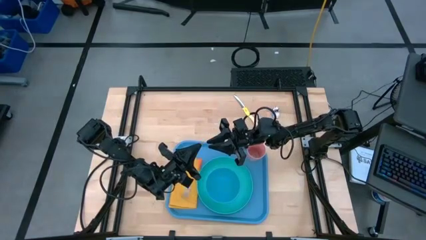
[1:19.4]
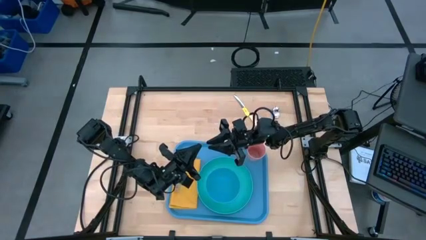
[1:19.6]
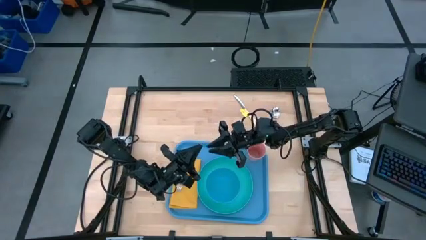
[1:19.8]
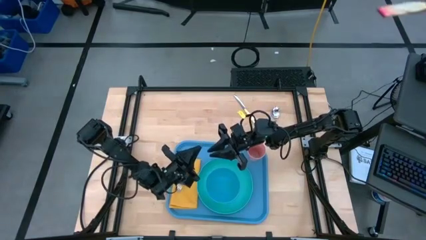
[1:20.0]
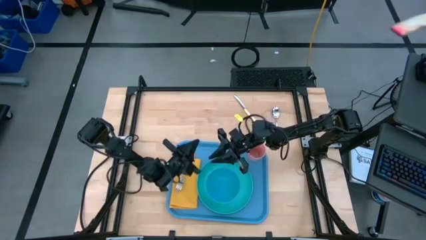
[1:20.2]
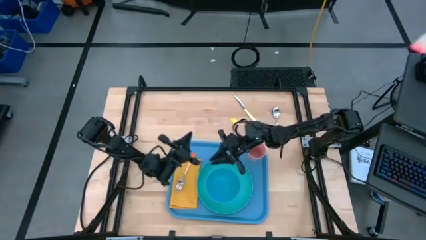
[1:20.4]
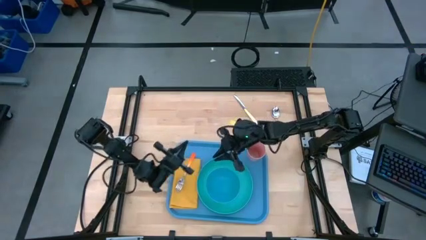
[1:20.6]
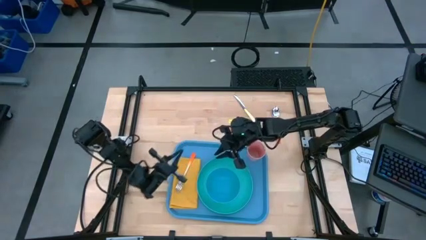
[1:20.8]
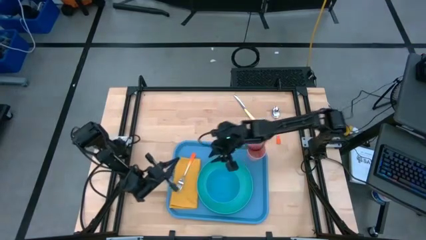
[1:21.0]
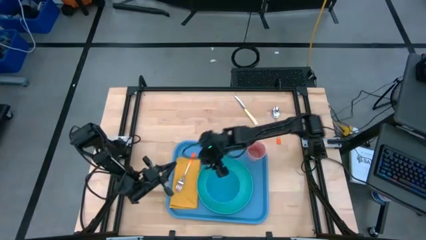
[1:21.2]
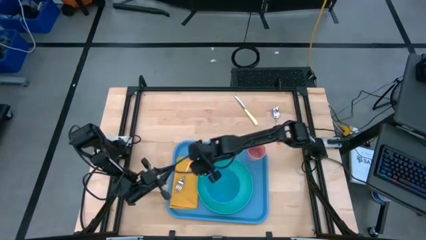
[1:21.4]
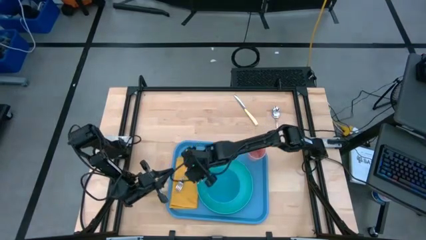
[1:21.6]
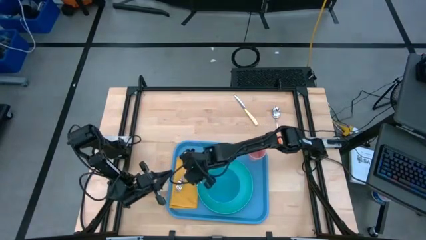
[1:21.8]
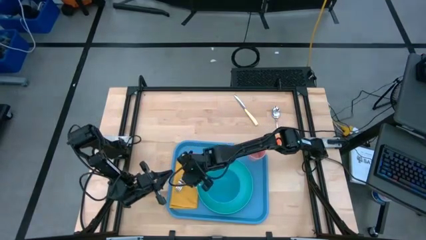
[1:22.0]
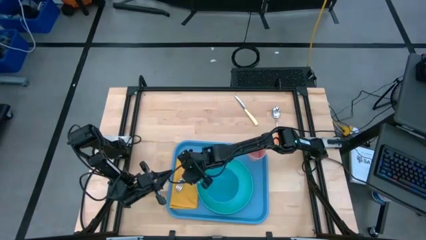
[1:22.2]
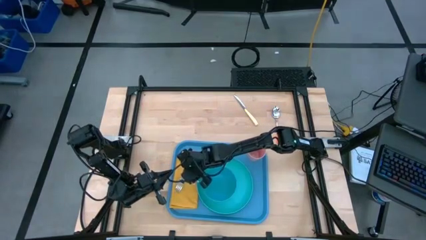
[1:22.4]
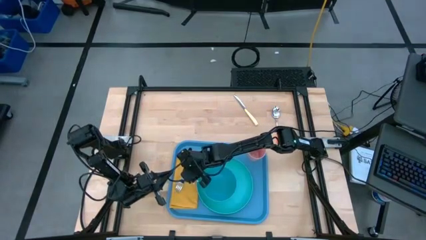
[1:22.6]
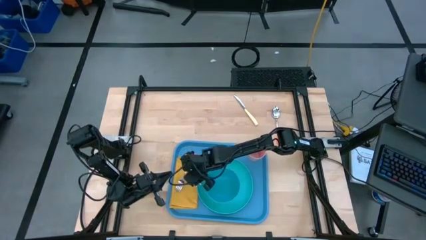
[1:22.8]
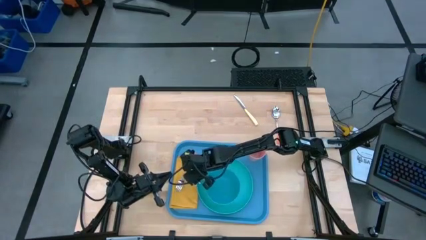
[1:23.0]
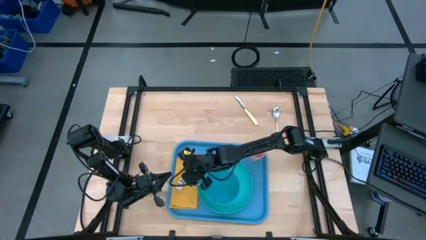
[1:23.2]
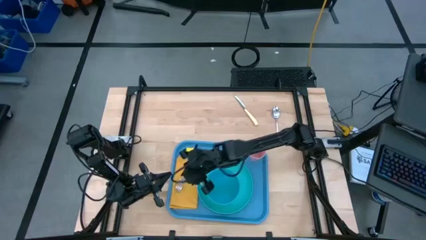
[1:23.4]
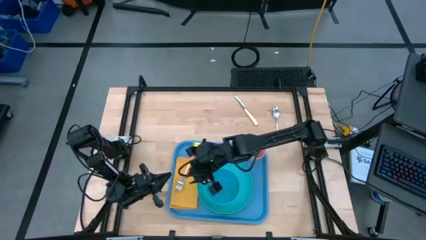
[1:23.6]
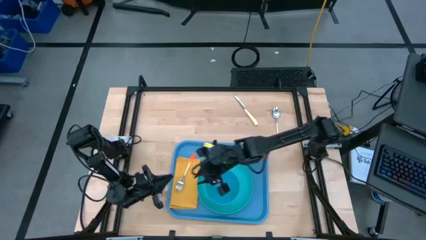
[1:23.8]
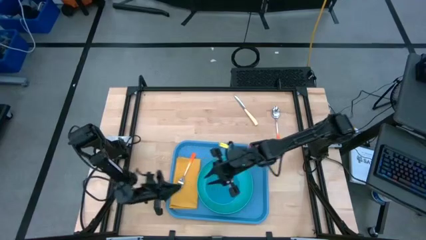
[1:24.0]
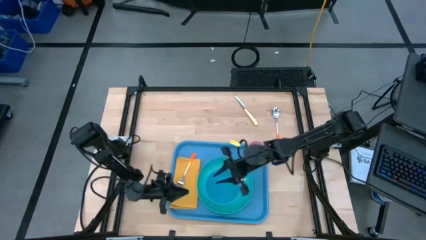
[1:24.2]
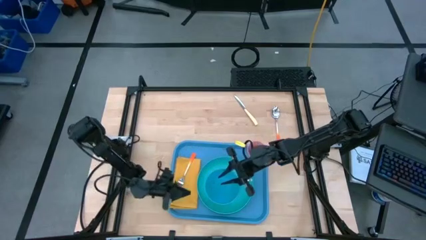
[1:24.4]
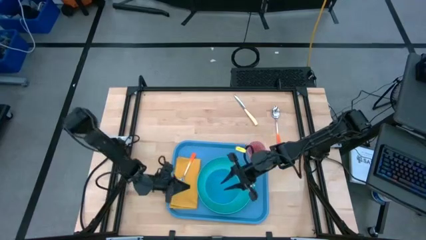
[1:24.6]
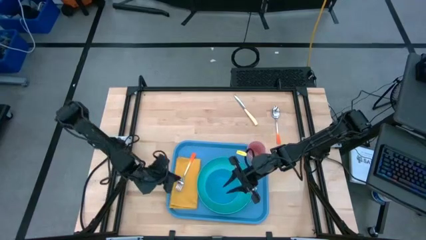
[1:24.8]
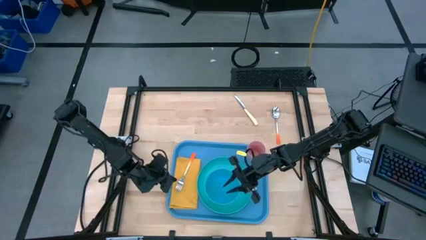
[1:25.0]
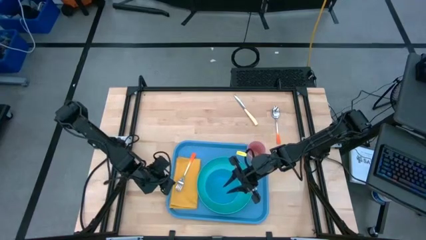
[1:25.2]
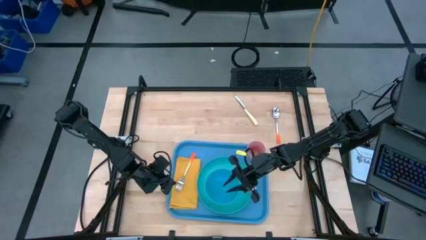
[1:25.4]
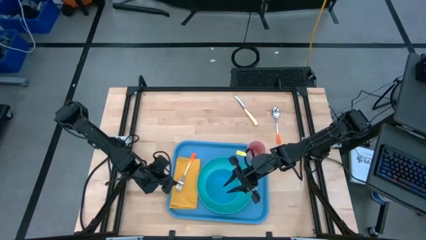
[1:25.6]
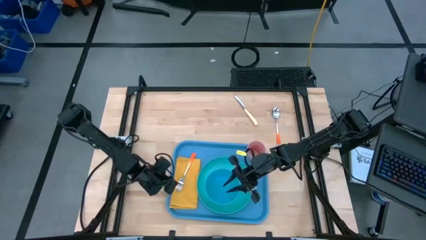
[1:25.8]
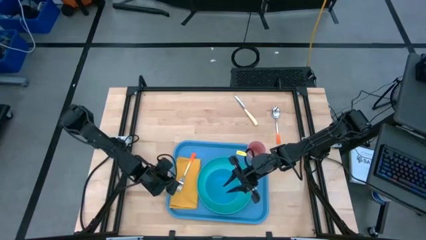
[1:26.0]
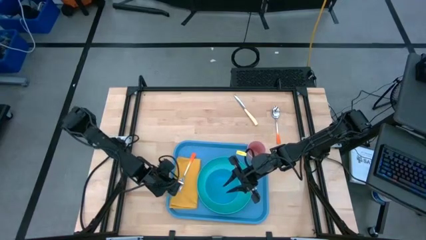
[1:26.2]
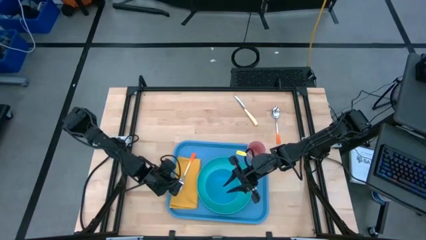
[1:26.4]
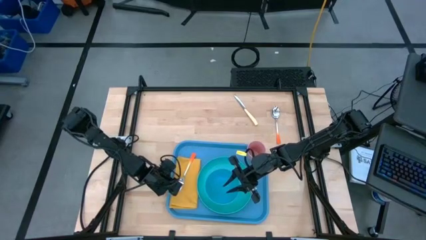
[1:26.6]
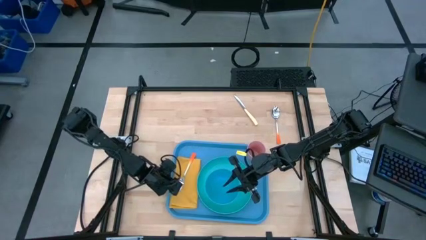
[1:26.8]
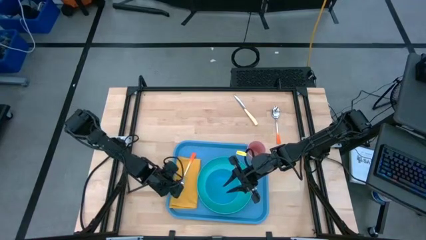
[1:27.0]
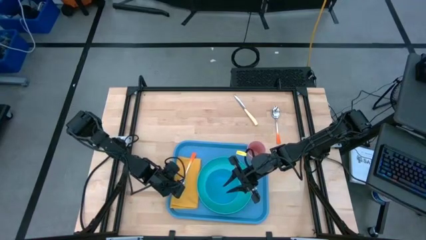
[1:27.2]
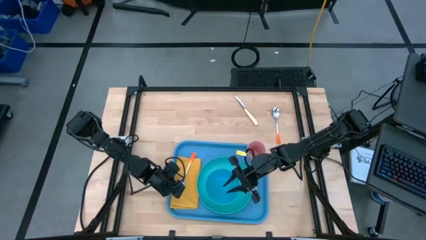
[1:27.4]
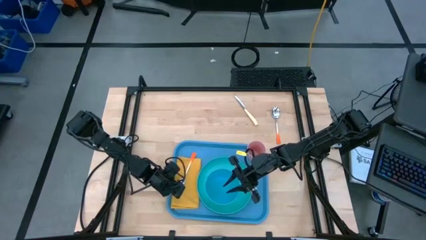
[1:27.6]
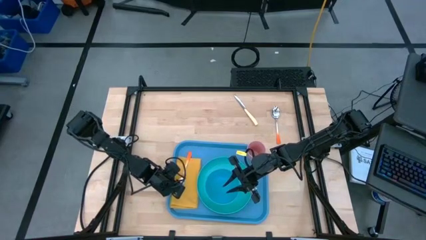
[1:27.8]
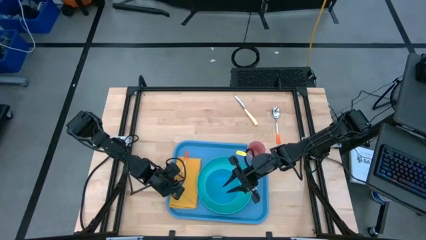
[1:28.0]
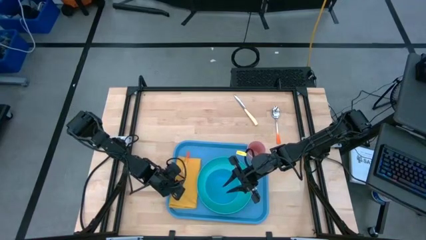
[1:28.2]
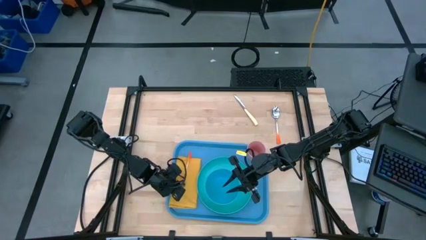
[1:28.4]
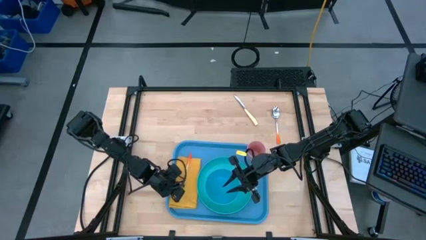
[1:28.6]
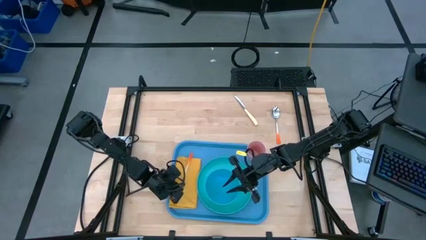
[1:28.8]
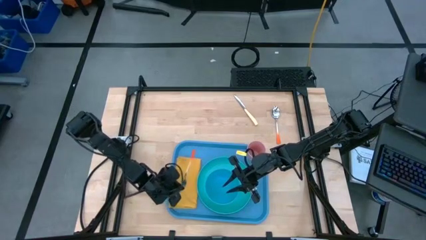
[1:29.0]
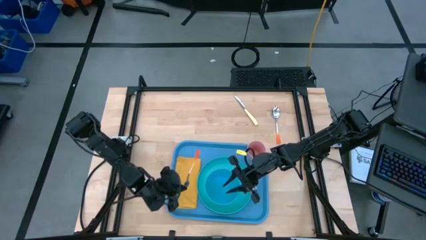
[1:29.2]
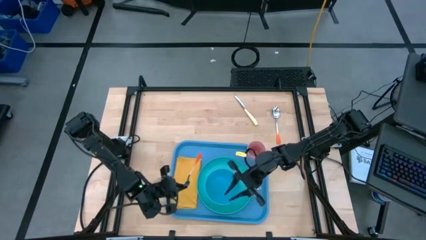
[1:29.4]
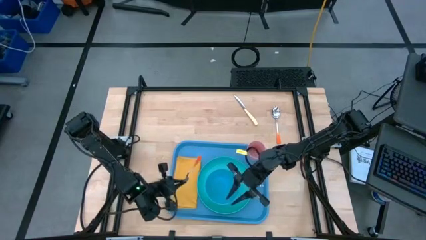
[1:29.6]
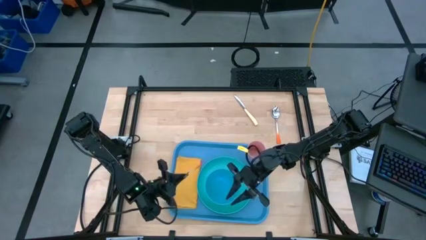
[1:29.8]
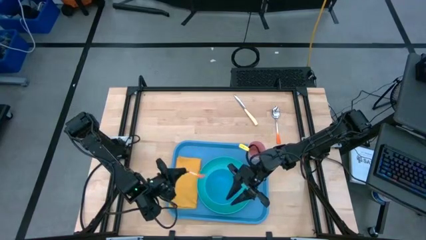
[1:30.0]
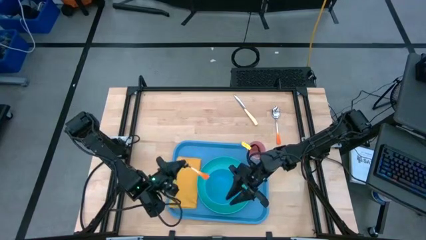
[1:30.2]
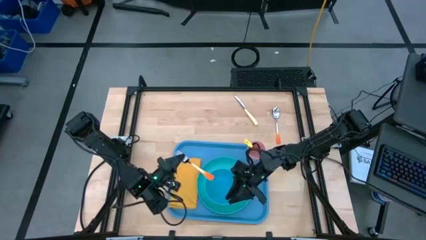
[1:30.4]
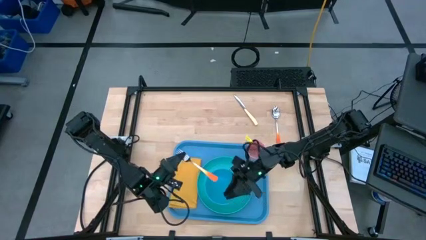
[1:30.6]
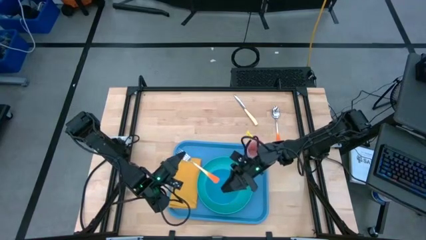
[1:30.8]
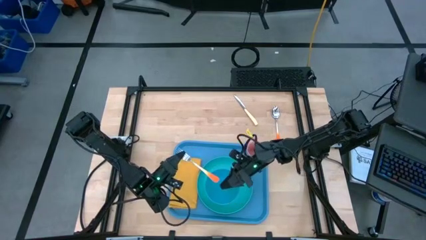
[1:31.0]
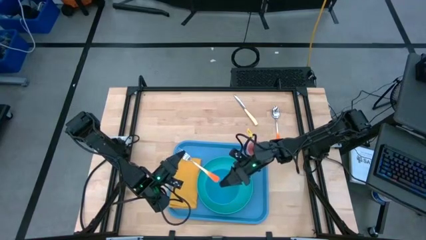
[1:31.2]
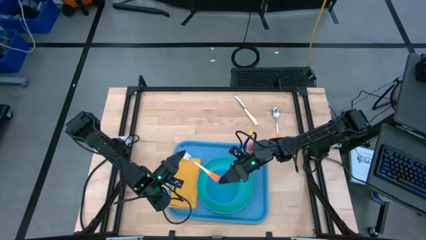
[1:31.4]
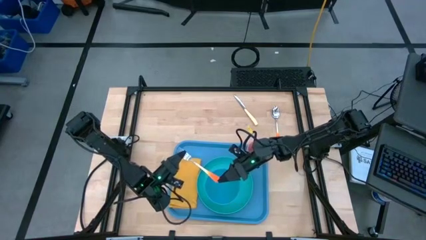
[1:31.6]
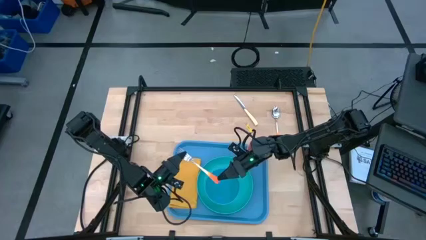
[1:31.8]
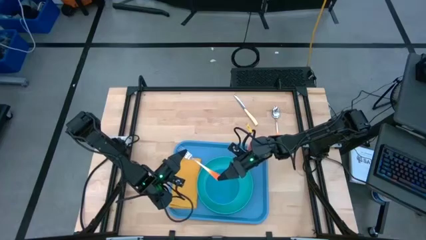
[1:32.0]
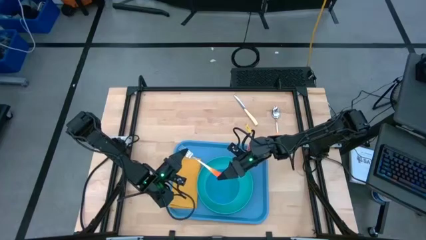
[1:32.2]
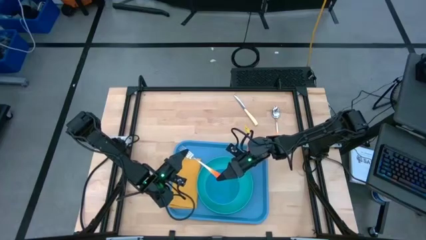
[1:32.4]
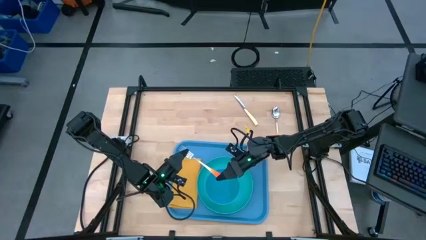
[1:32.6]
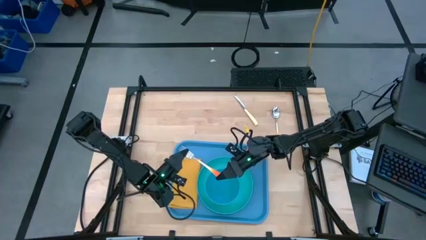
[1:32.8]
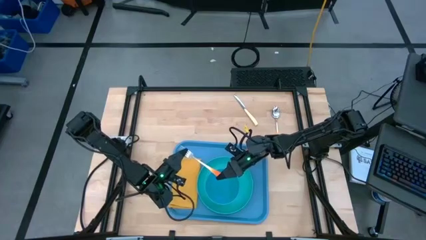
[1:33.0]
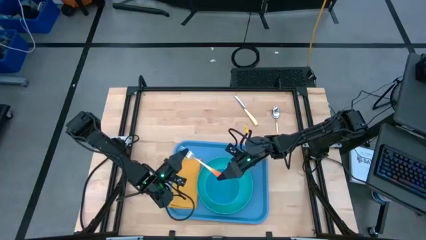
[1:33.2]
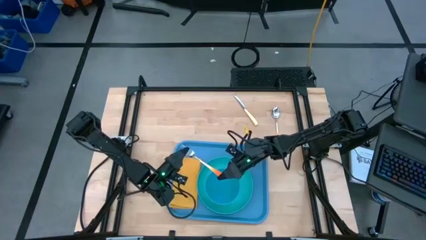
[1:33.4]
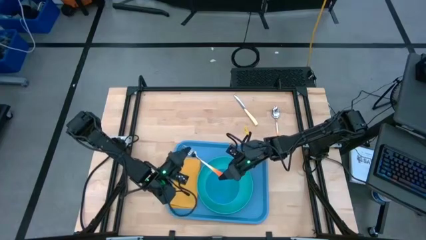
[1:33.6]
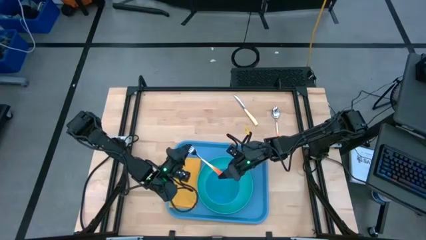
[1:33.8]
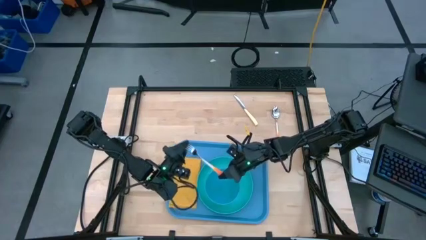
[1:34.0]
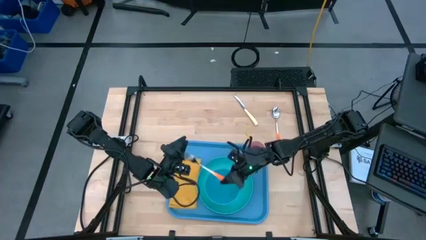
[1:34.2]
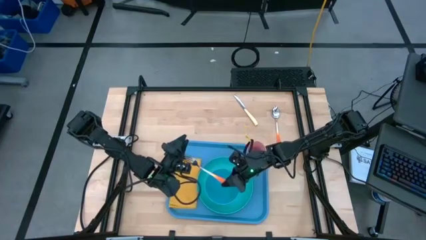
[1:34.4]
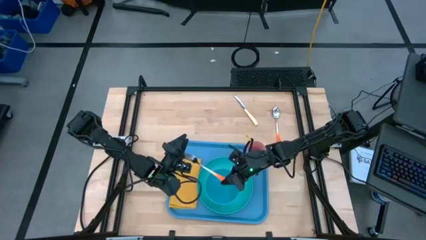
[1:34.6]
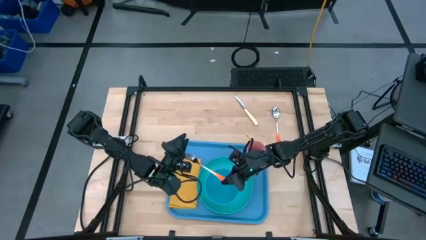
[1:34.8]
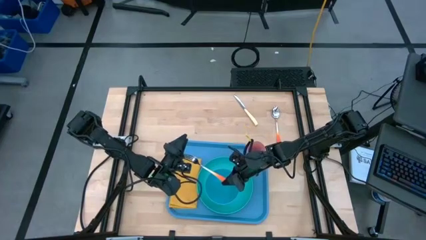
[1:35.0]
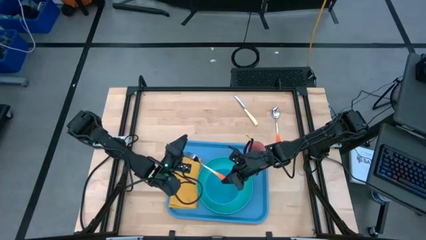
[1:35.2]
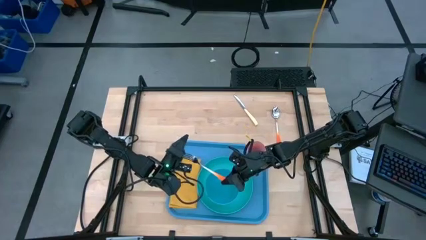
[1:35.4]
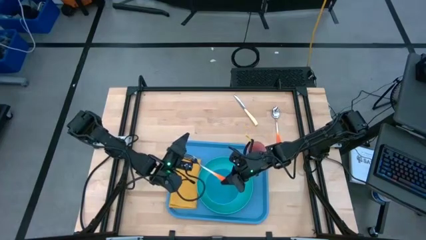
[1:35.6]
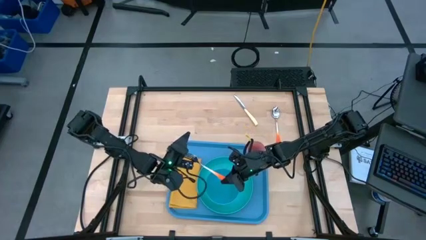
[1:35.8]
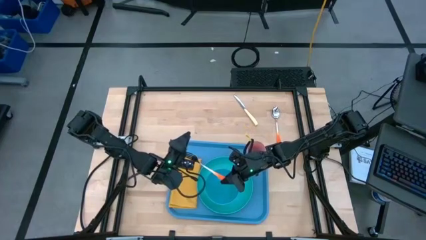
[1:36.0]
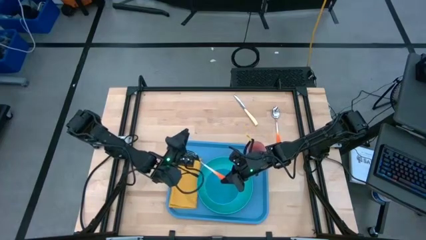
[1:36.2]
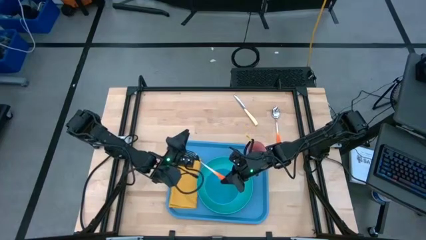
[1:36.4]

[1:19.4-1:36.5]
Task: Set up tray
Put the orange fork on the top of the yellow table napkin
